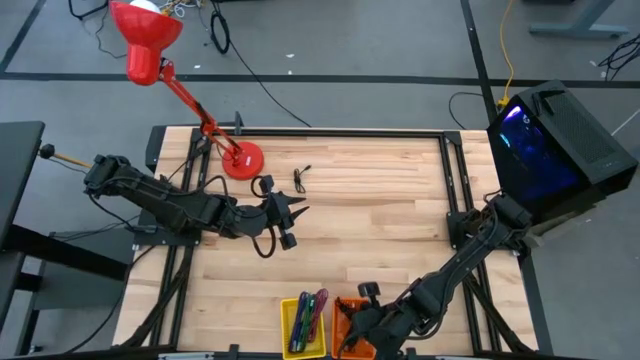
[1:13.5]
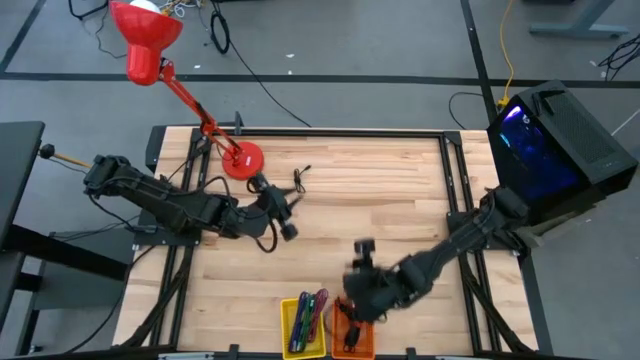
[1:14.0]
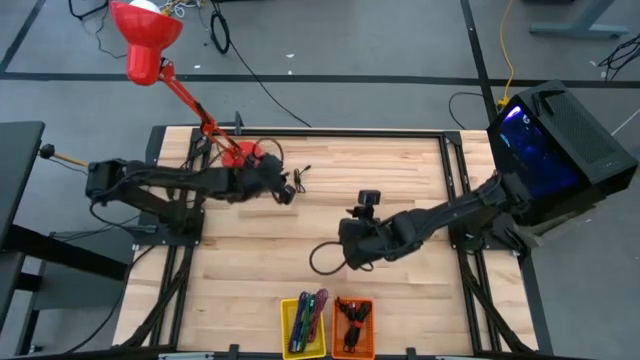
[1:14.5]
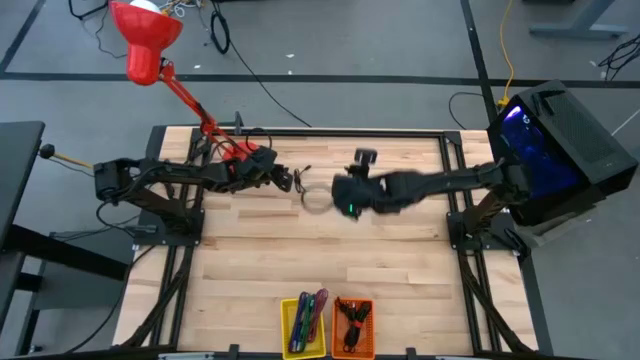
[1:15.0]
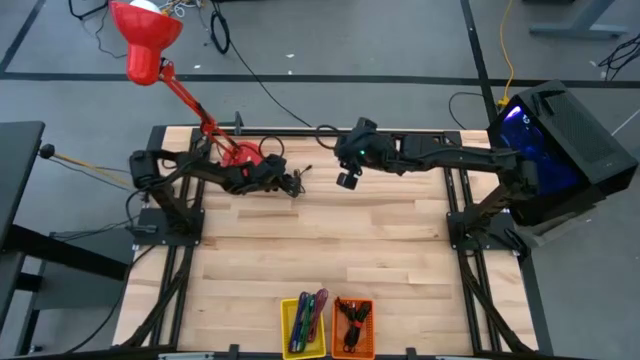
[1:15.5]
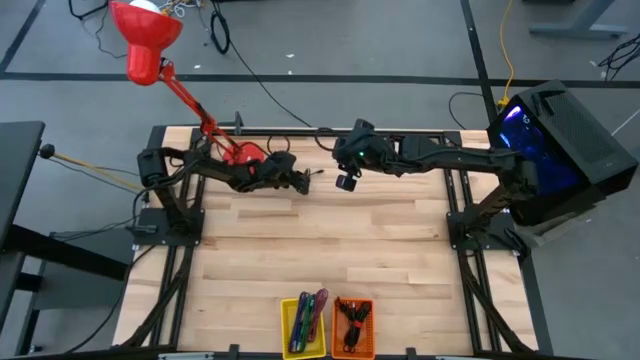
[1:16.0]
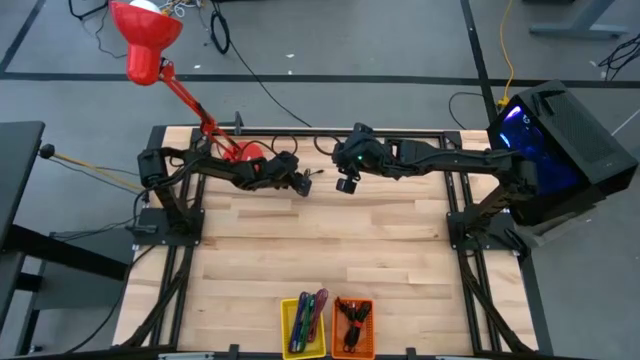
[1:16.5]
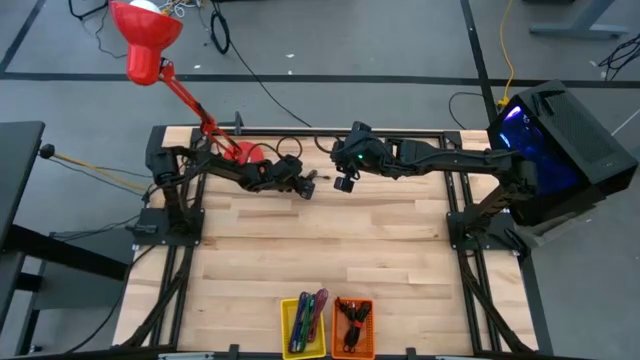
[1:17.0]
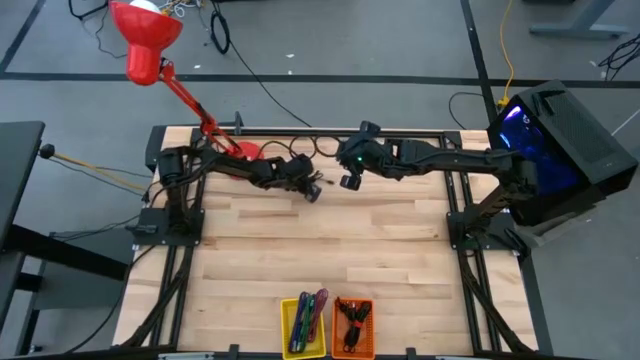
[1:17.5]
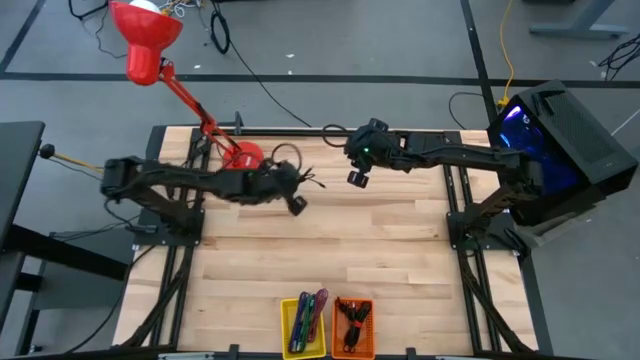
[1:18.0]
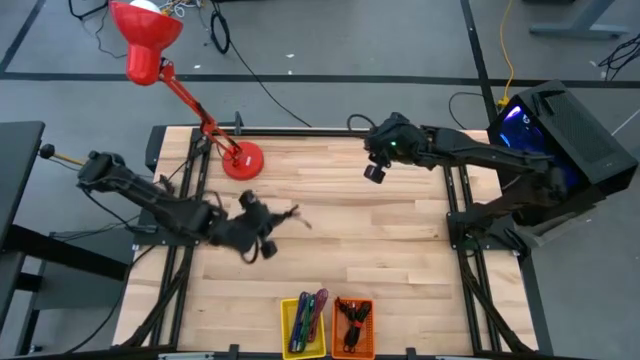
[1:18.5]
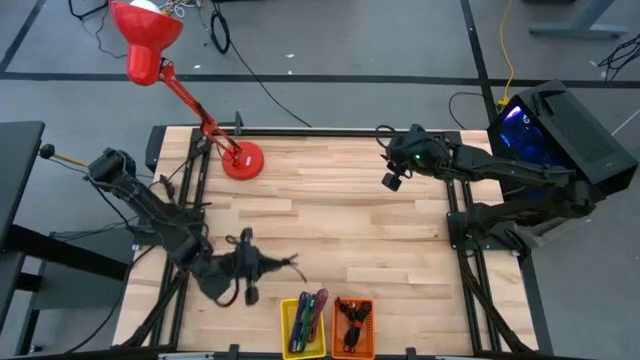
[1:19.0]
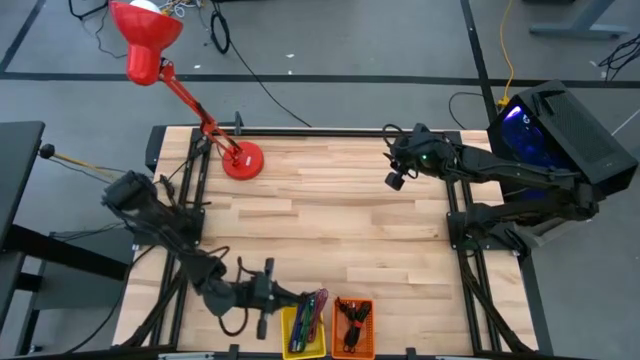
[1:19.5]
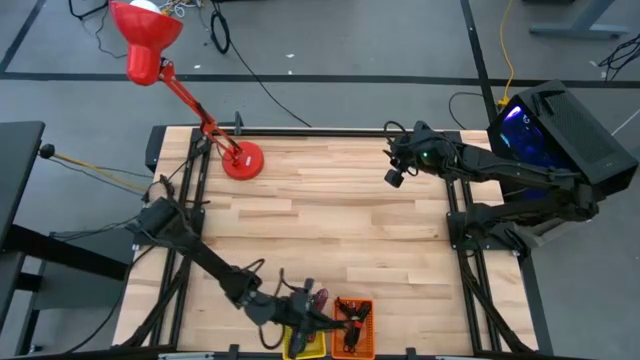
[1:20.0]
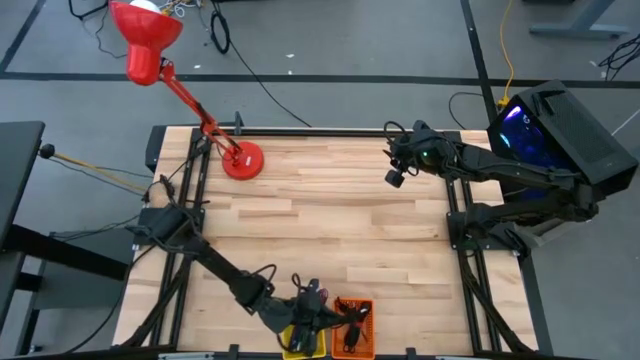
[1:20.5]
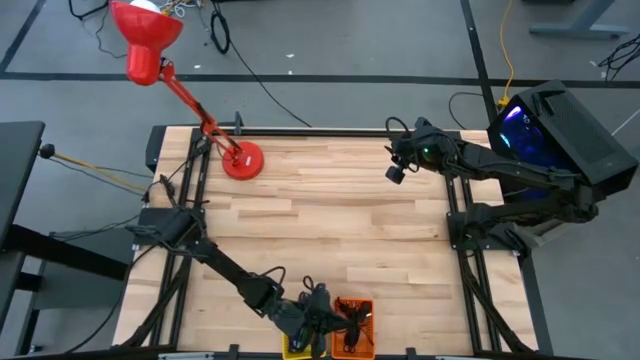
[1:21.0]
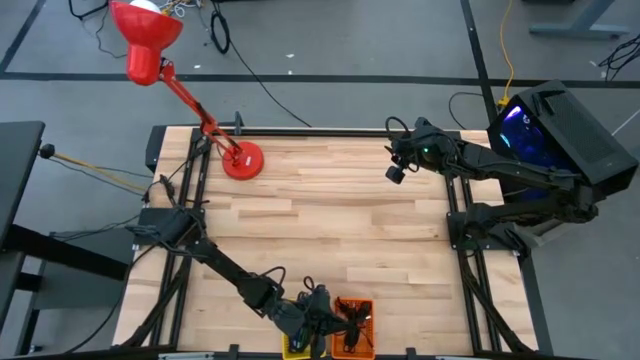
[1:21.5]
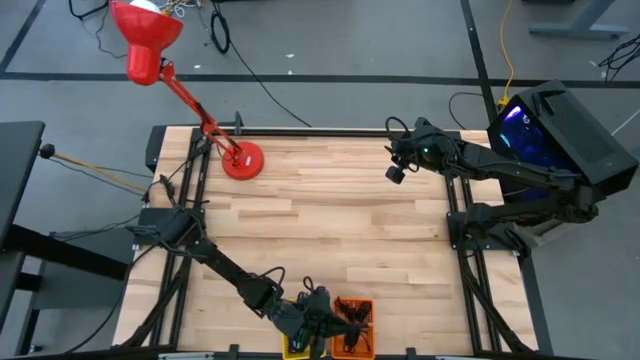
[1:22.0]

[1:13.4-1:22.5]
Task: Pick & Place USB Port
Put the black USB cable into the orange bin

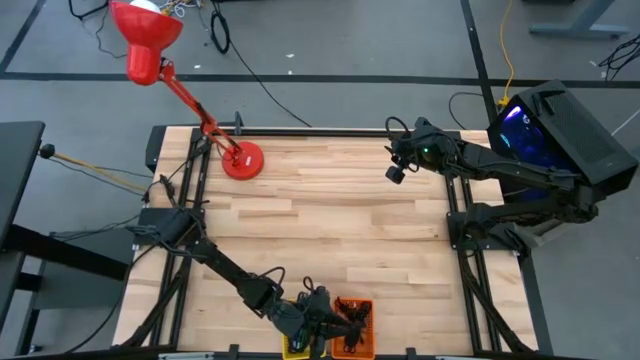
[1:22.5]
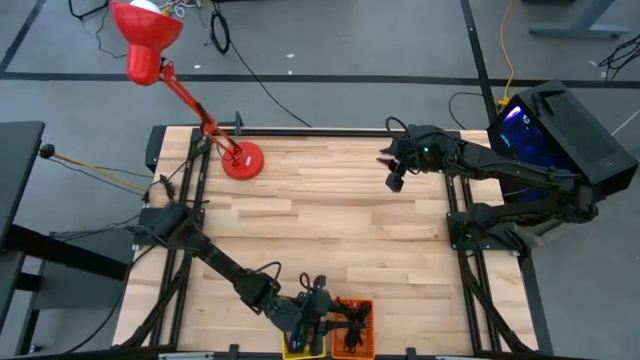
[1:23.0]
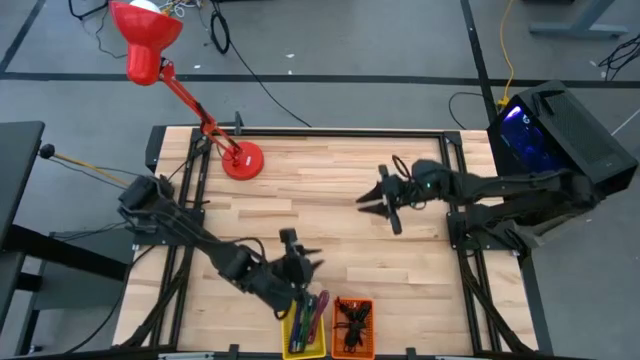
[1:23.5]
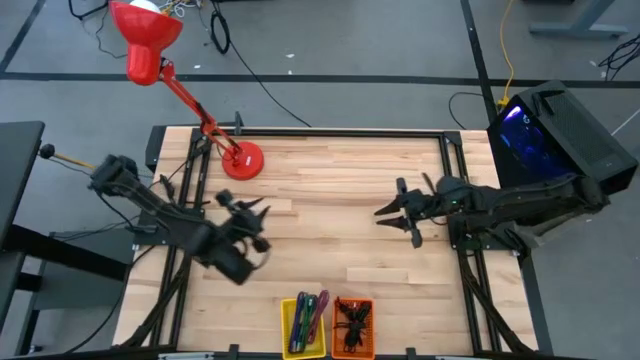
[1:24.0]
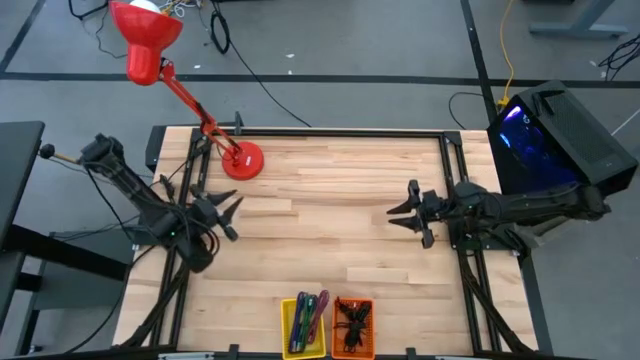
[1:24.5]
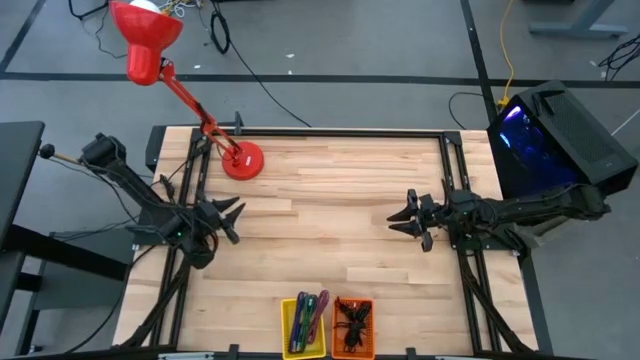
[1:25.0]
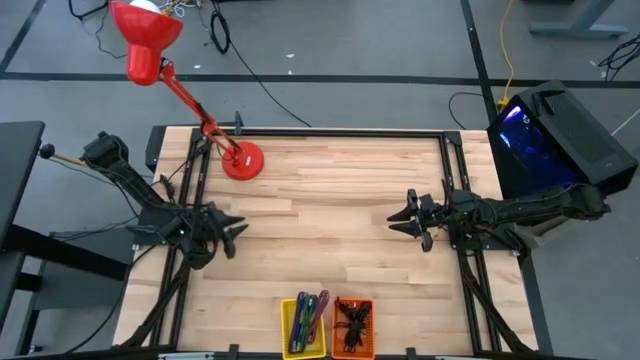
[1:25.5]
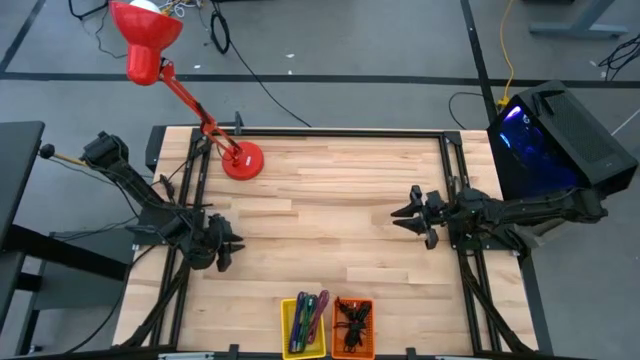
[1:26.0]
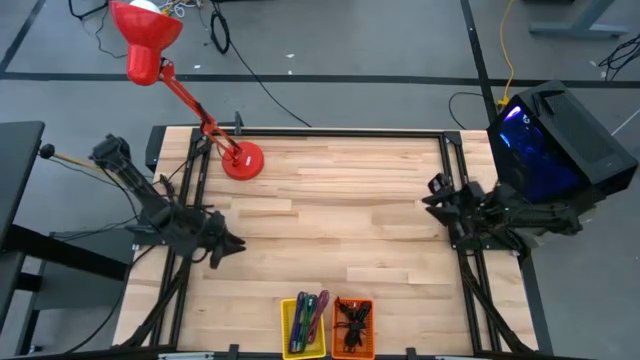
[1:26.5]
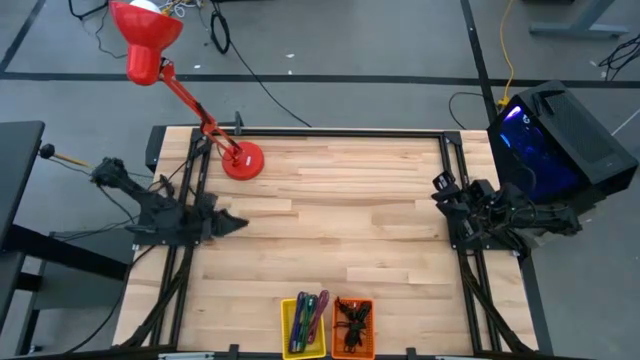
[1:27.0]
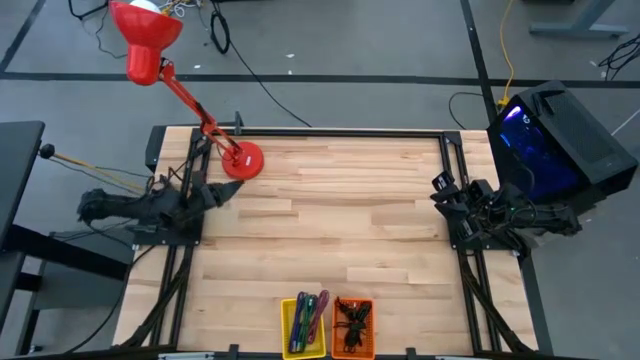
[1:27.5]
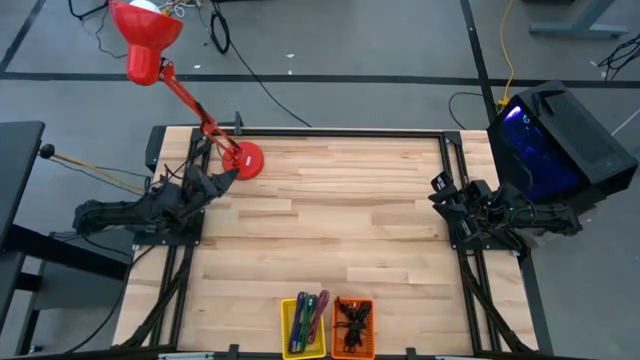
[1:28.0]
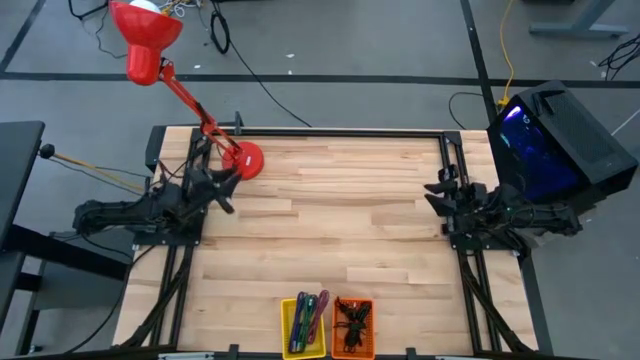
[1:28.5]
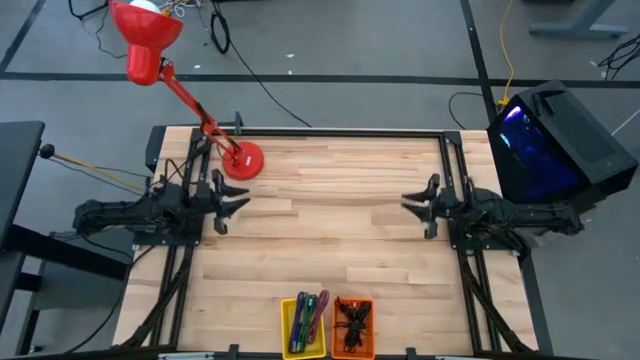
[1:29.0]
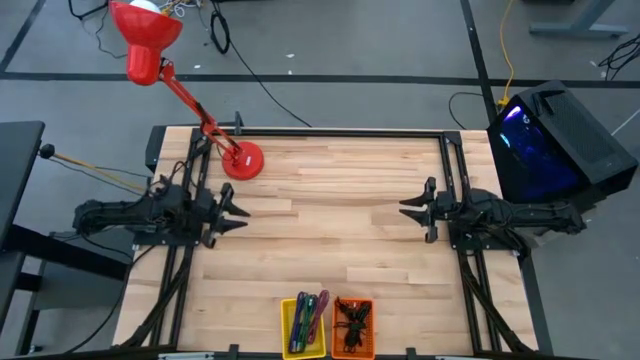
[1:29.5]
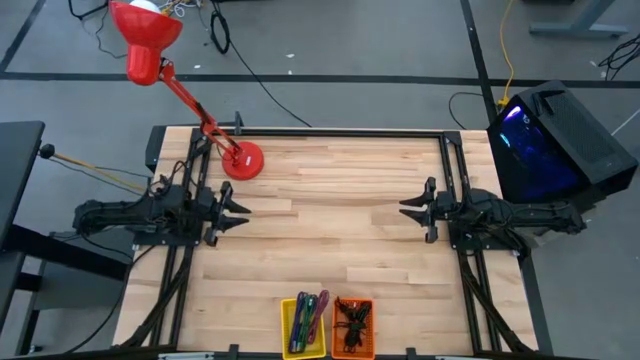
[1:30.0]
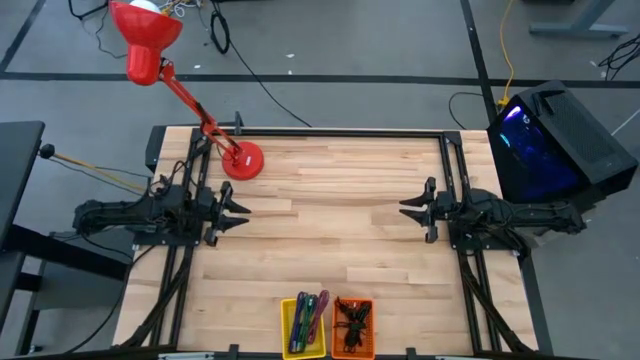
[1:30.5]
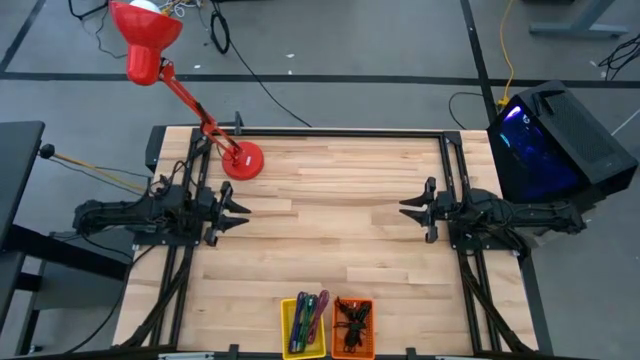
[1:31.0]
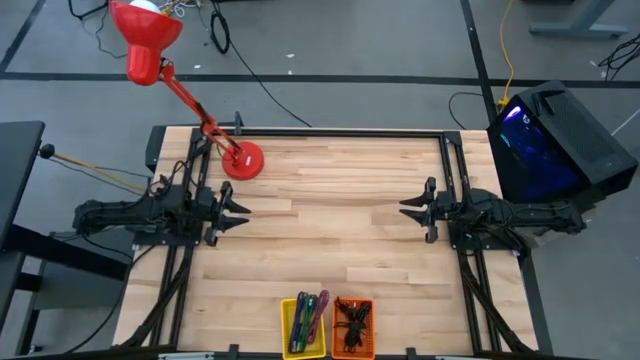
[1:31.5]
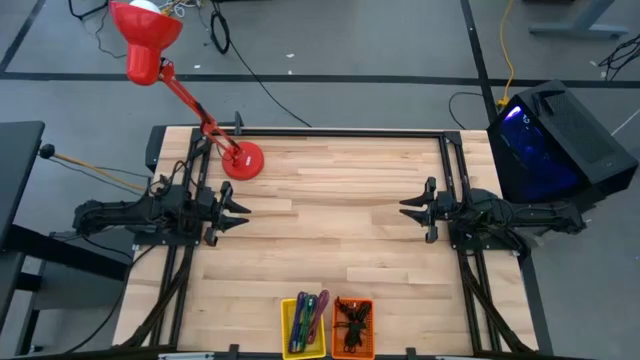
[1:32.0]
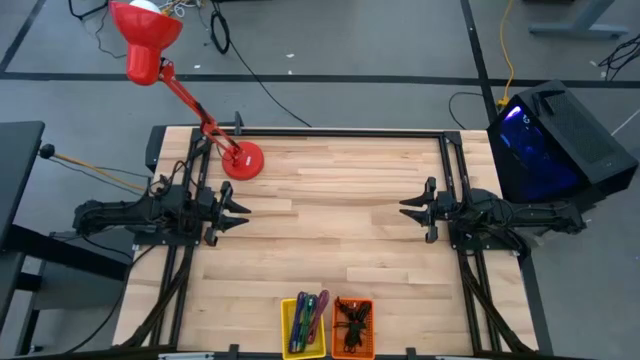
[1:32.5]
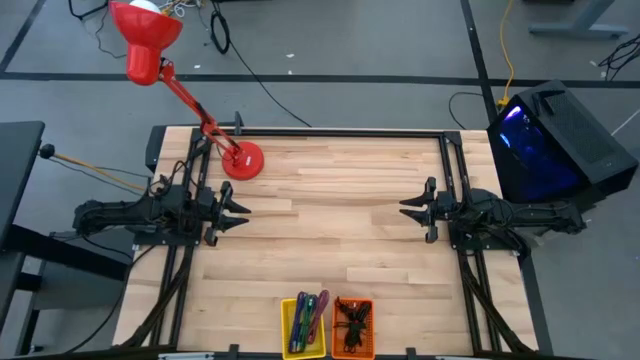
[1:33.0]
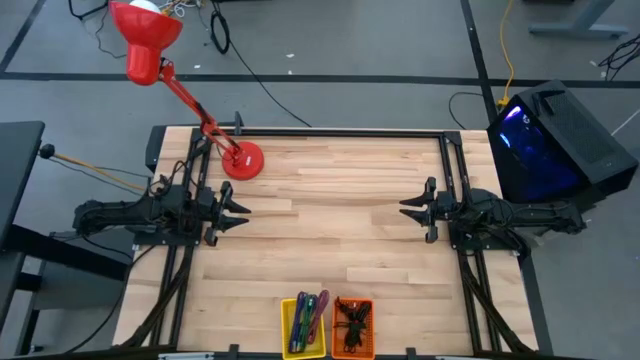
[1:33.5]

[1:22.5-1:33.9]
Return to Home Position

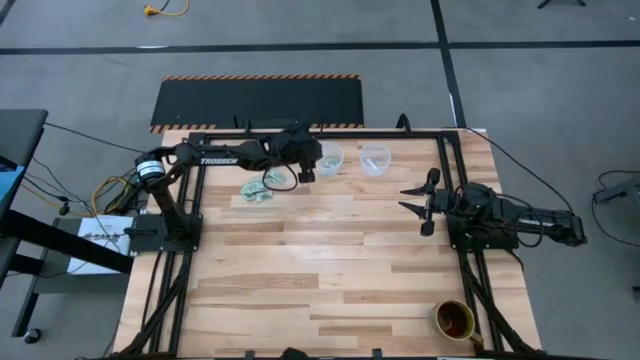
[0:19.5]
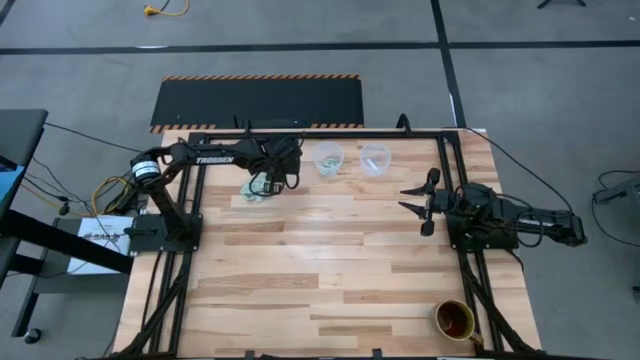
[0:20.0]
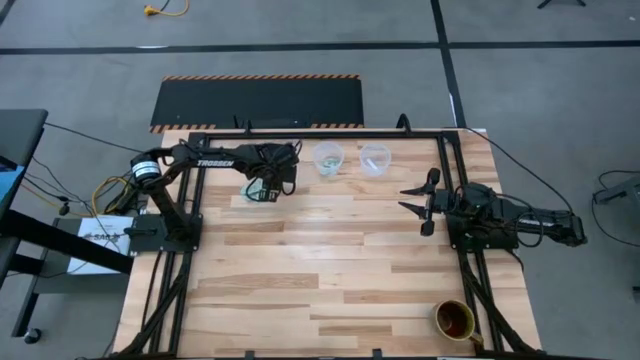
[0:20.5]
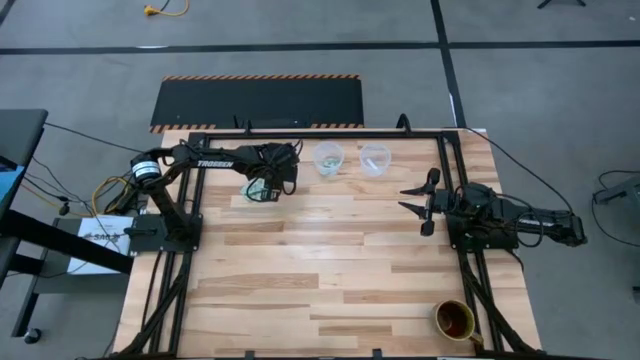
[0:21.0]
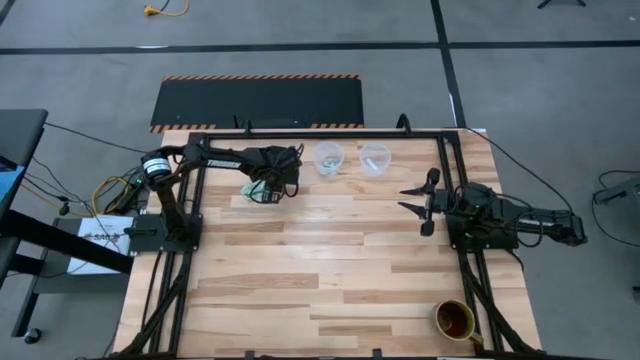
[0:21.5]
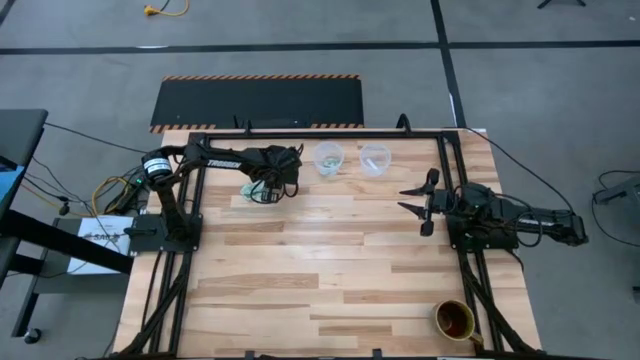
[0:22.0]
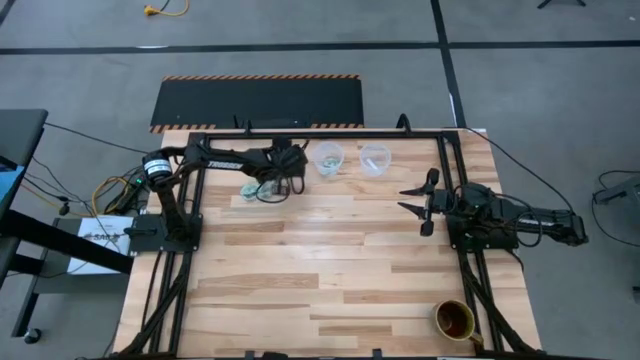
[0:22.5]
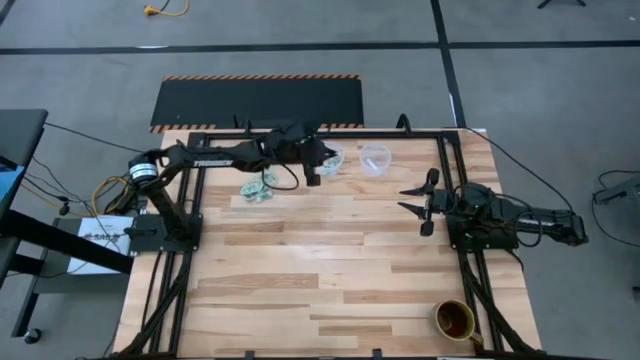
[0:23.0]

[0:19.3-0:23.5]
Task: Pick and place Stevia / Truvia into bins
Put the stevia packet into the left transparent container
